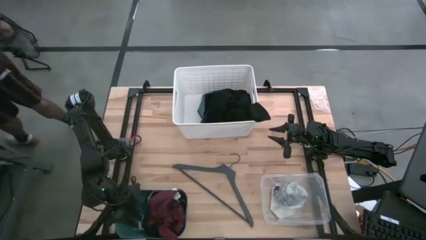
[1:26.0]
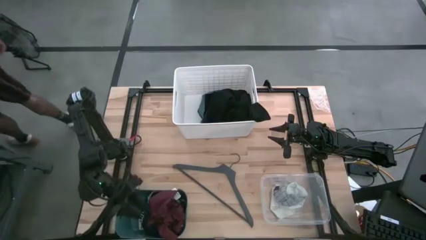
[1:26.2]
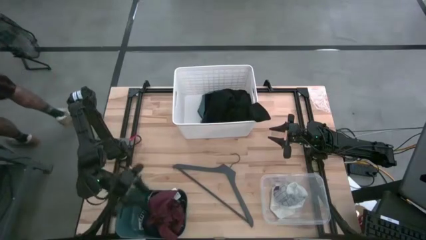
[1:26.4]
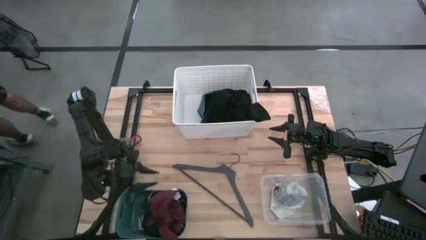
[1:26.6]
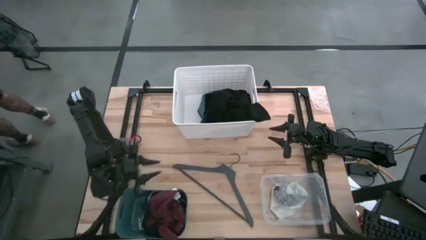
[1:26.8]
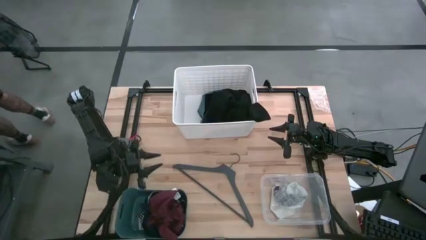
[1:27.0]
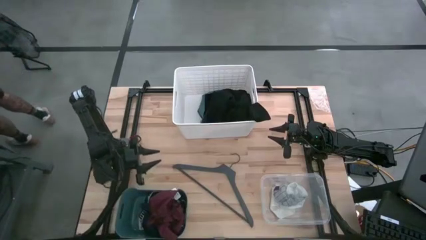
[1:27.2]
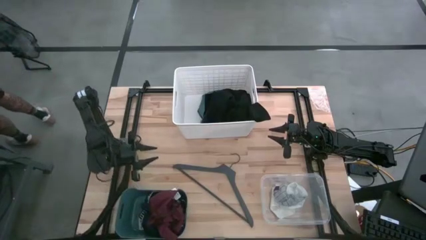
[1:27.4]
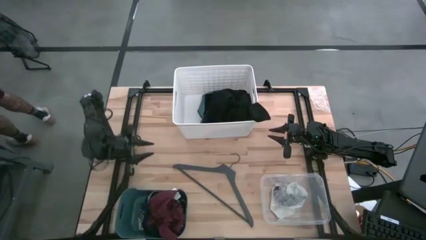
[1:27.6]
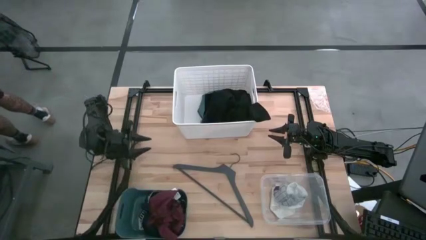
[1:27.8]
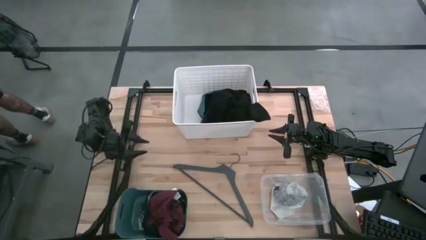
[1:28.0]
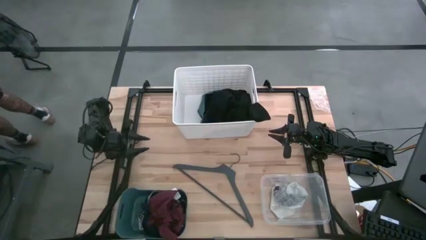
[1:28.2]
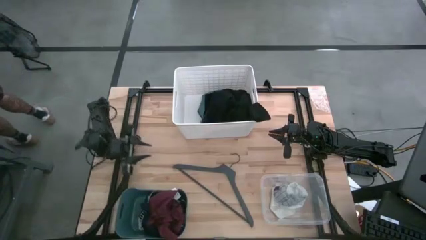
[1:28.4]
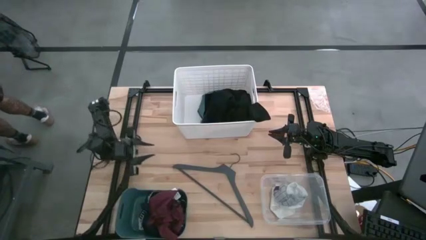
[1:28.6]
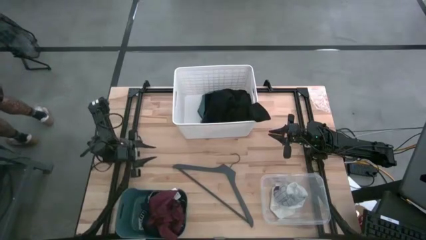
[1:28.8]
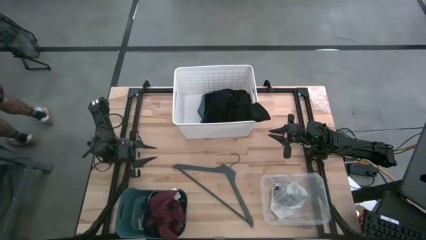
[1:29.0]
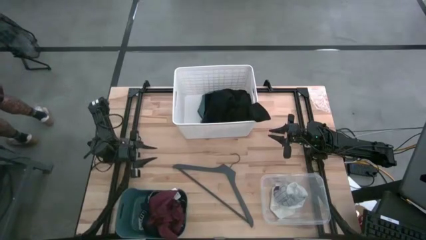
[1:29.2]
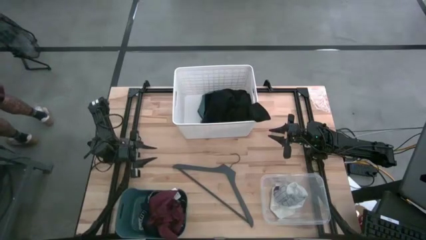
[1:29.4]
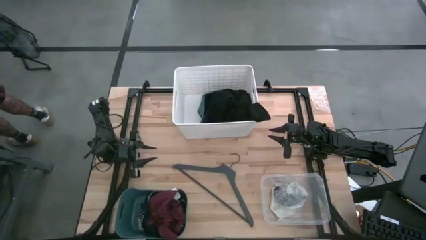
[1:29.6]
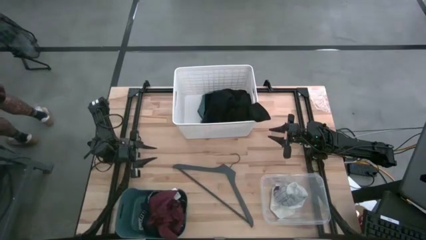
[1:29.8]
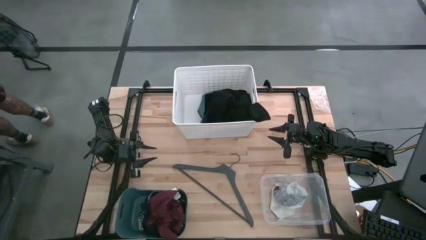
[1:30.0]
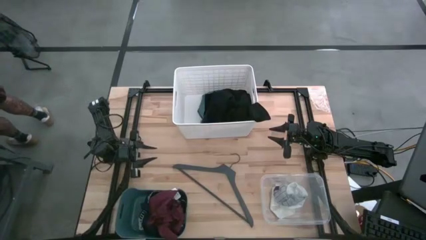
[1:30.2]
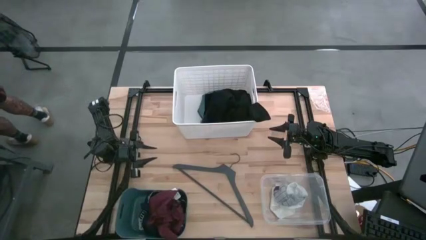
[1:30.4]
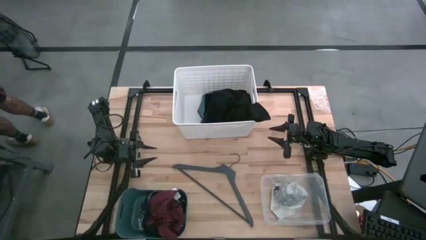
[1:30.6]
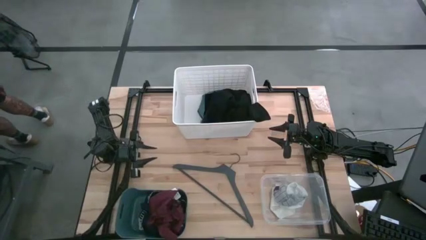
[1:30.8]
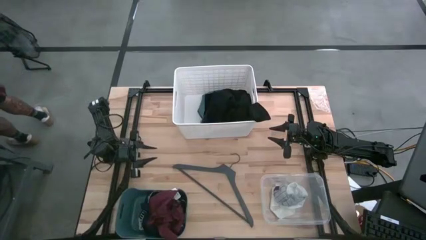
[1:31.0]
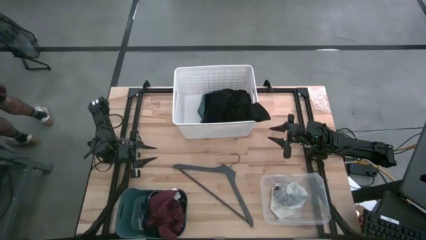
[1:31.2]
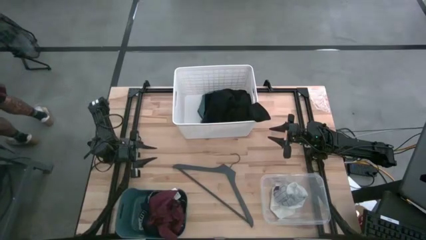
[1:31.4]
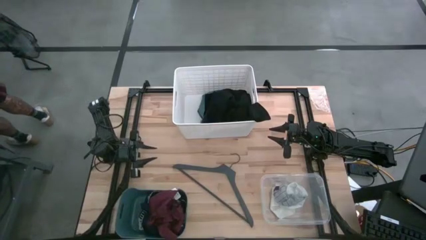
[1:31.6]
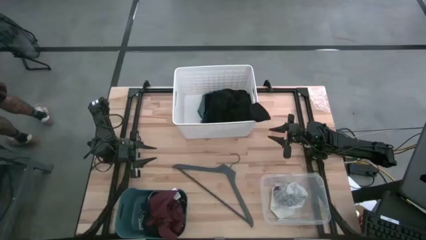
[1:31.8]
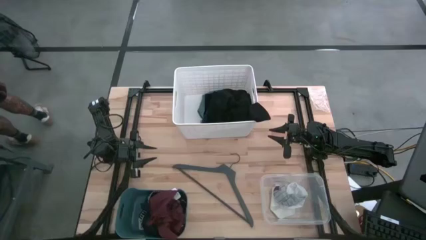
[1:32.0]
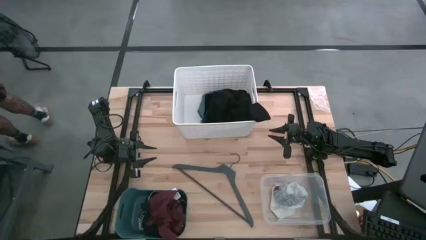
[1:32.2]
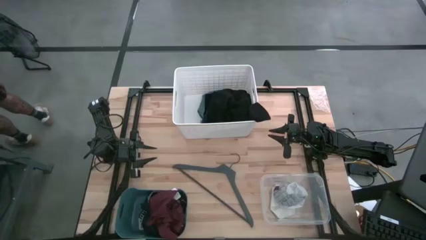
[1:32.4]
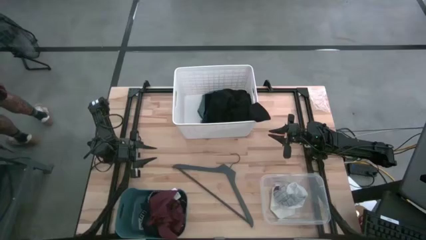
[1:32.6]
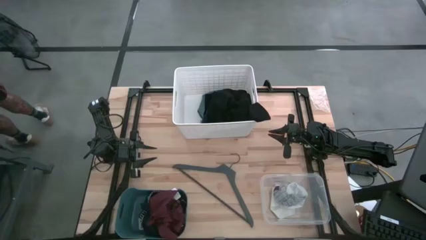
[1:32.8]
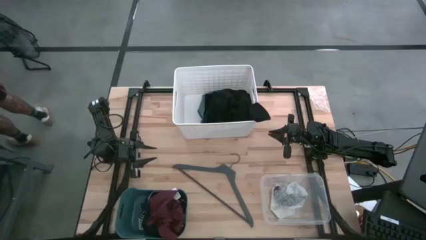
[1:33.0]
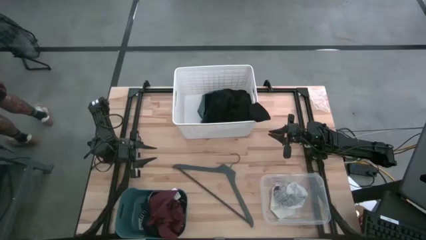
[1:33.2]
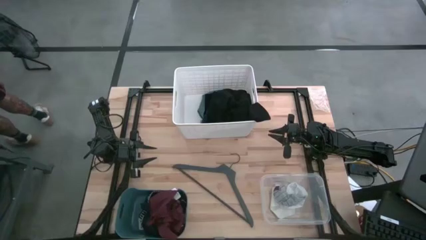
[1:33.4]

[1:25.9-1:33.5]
Task: Pick & Place Cloths
Return to Home Position

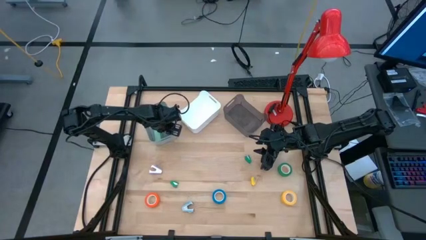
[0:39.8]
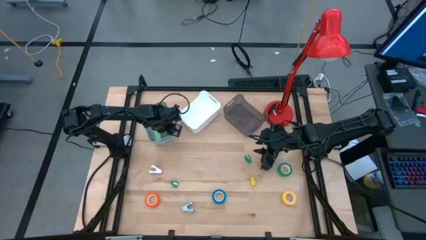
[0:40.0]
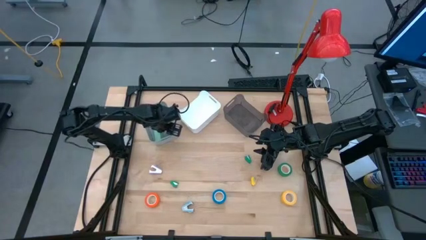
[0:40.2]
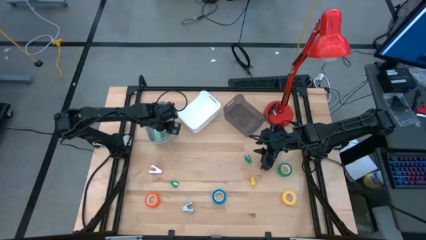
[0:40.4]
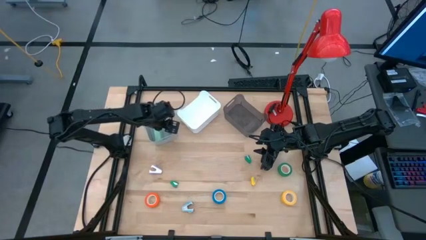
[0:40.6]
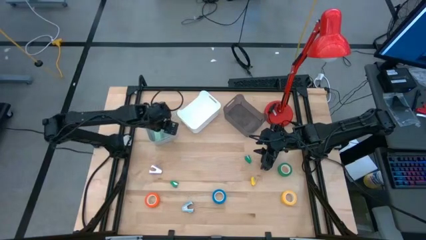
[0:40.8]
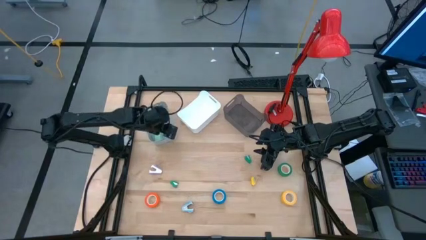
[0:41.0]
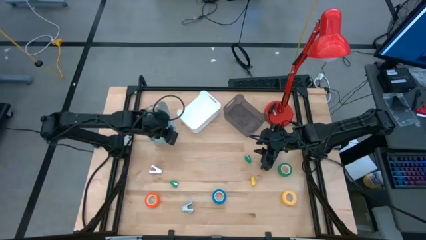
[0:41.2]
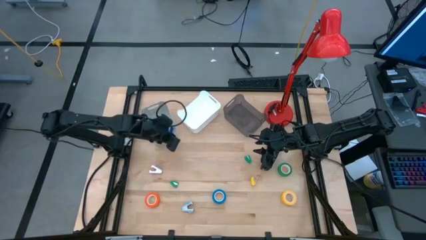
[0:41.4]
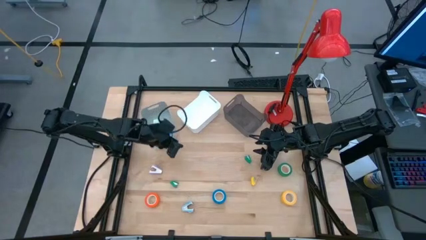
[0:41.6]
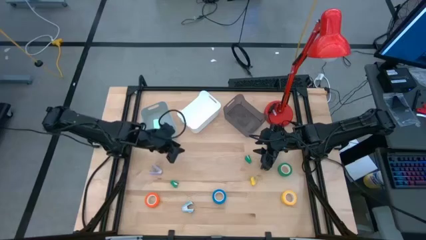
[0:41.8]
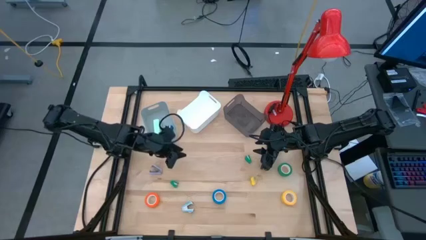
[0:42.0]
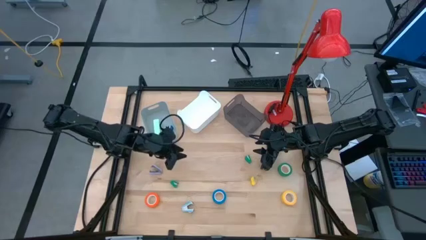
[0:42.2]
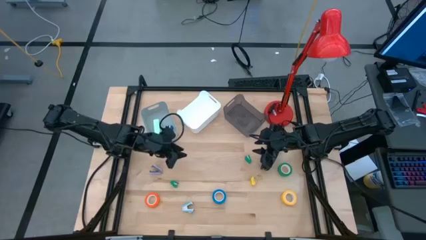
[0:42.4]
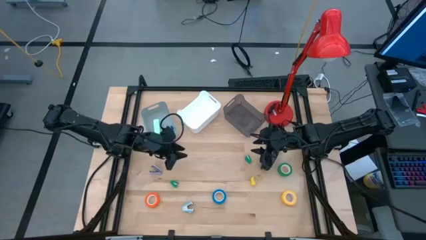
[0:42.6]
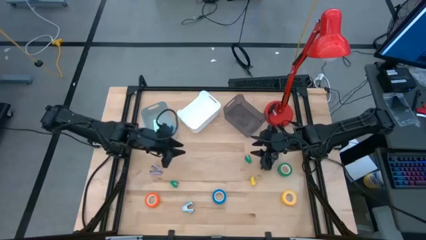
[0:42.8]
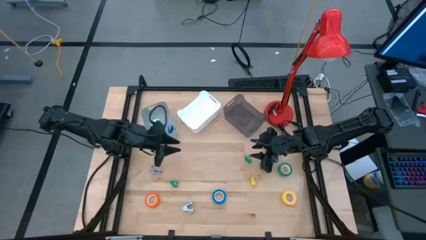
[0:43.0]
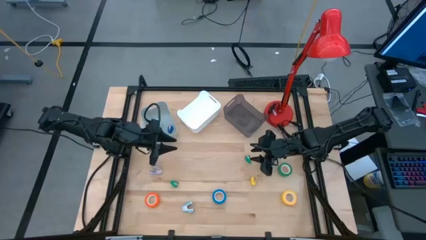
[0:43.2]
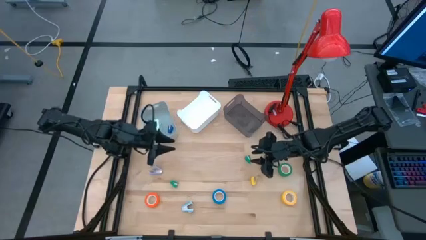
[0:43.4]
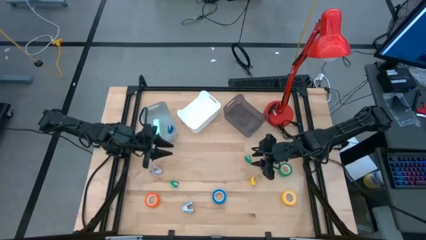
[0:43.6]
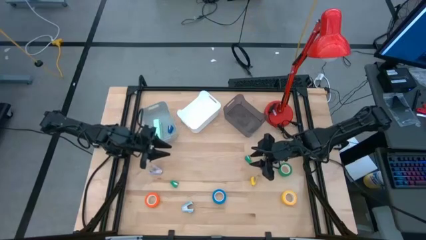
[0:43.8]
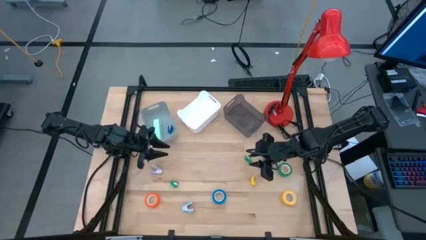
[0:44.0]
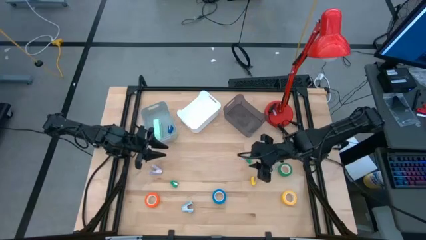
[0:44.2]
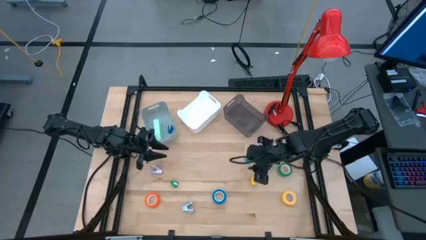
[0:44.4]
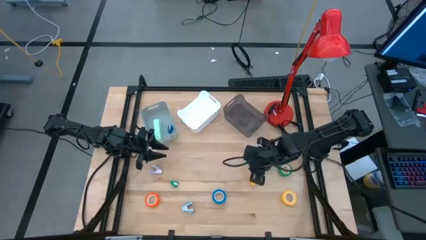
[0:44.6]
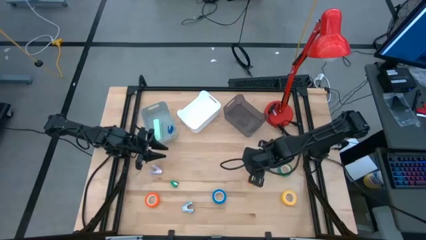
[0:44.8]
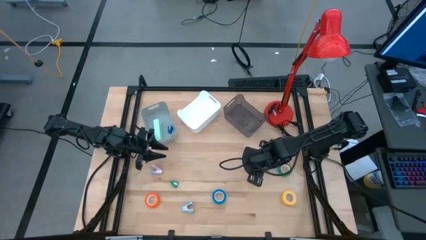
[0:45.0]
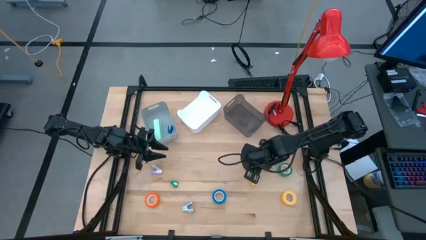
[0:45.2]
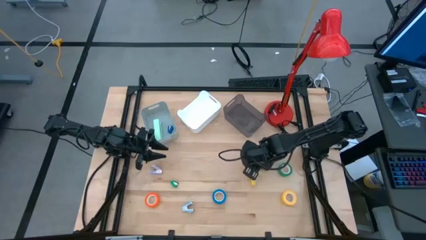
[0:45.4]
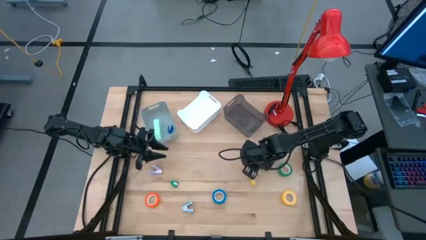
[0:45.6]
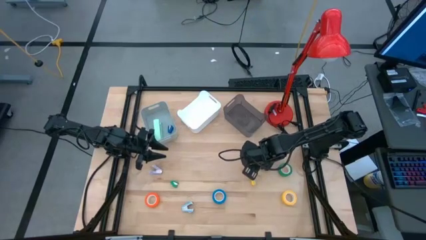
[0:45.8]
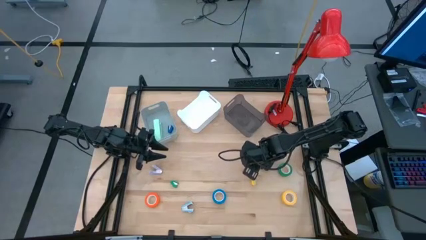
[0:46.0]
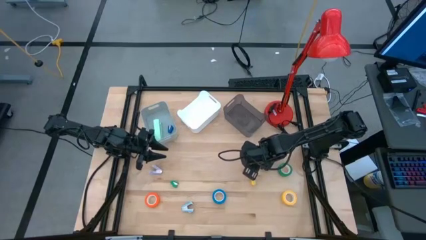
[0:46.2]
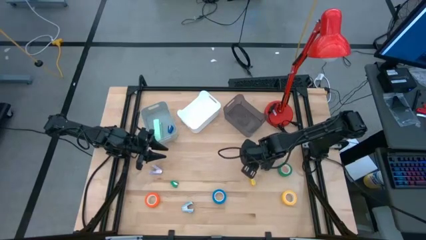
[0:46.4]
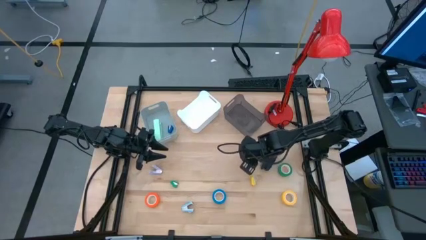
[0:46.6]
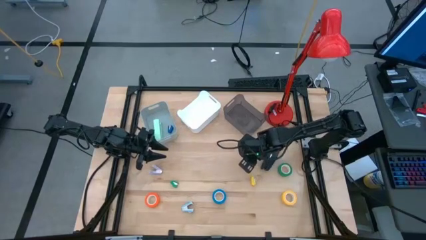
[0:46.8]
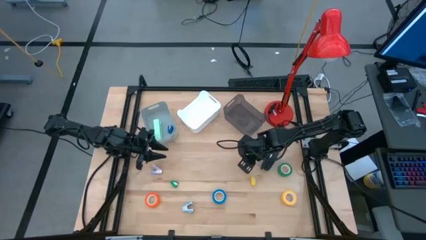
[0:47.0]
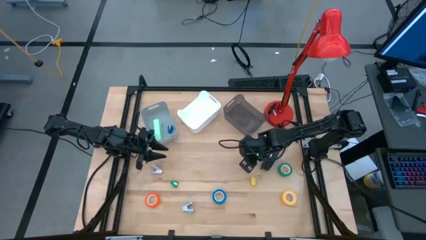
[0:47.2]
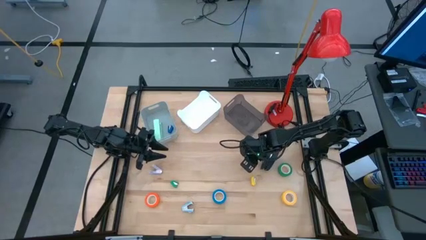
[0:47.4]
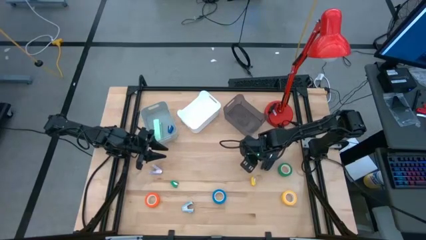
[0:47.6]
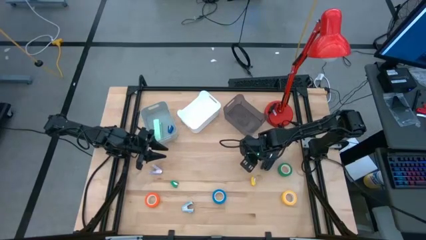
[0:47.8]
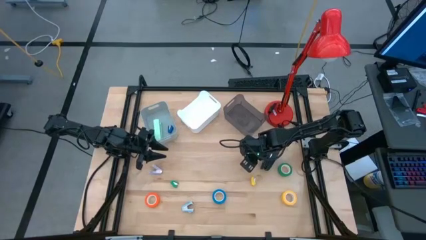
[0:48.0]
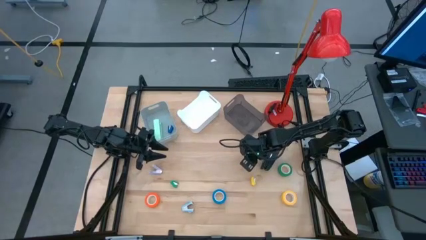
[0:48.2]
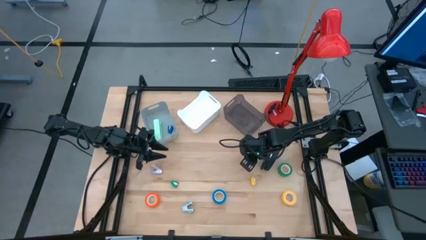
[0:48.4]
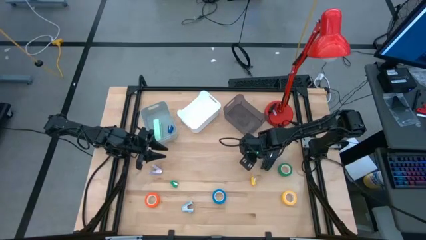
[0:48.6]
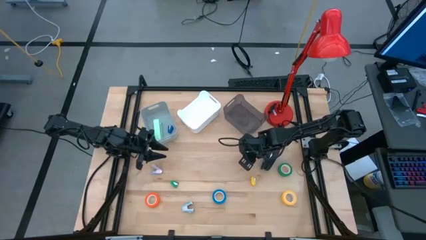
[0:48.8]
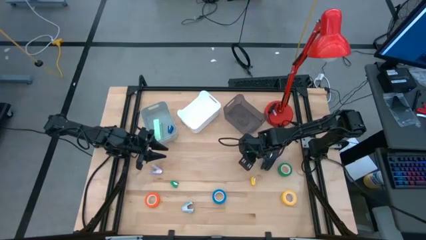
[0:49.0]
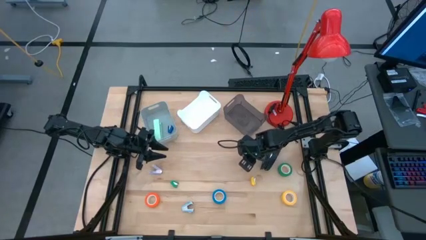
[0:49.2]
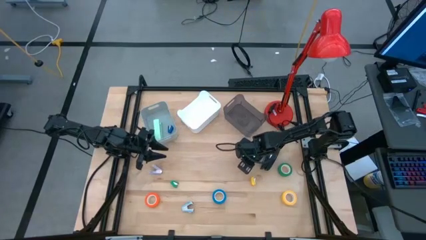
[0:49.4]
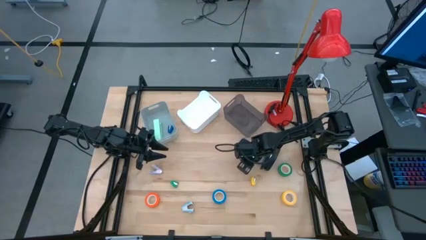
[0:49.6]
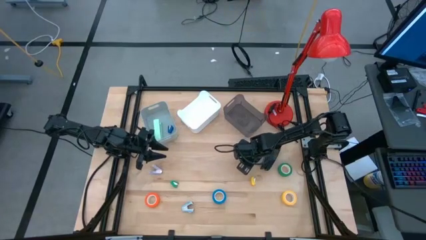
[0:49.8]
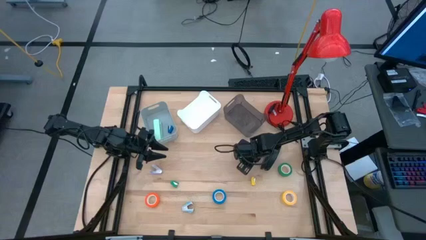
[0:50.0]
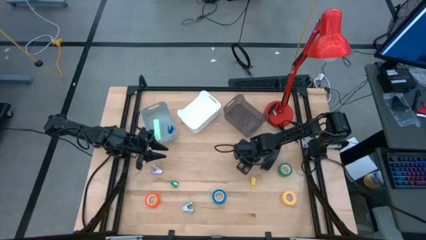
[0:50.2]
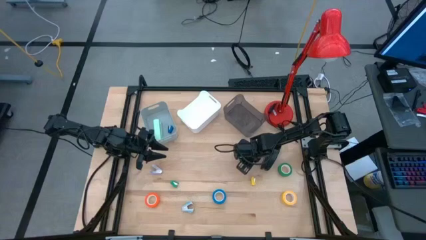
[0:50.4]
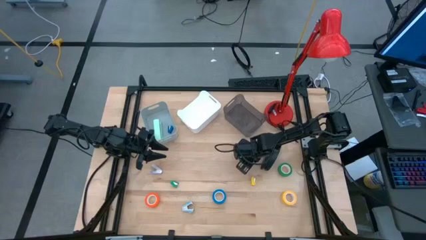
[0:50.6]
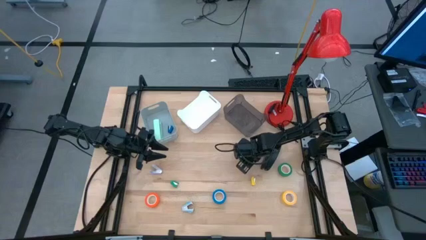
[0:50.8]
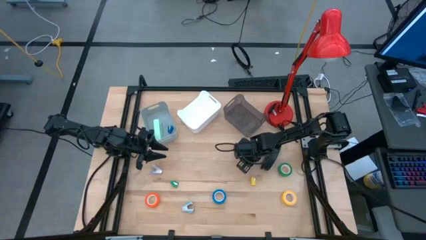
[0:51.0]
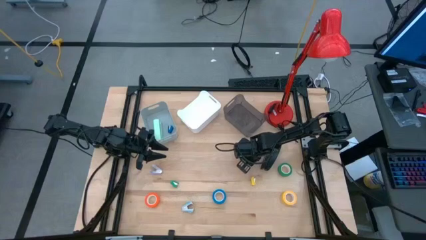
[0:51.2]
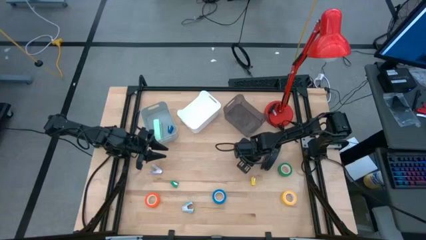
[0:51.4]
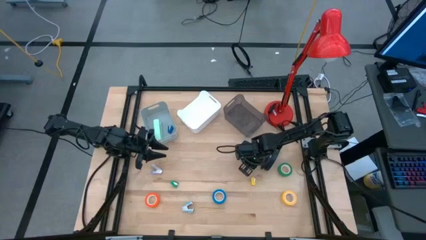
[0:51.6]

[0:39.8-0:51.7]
Task: Pick and place Stapler, Stapler remover, tape
Put the top green small stapler into the gray bin
